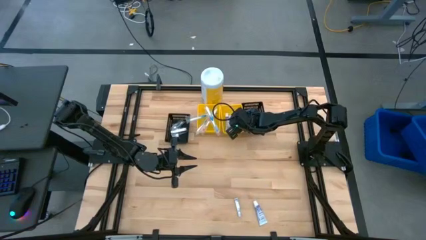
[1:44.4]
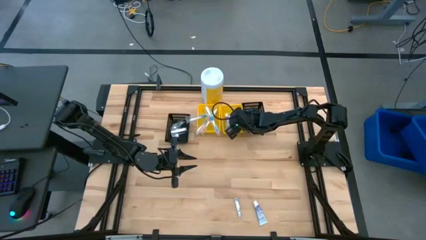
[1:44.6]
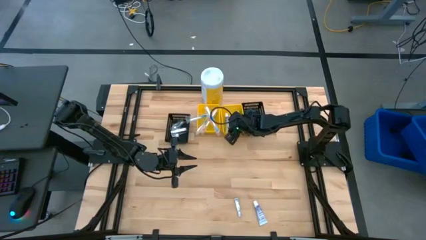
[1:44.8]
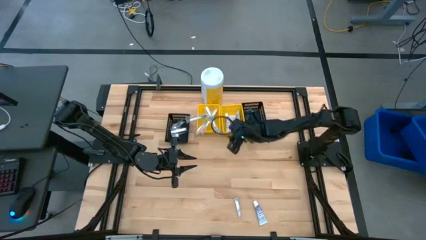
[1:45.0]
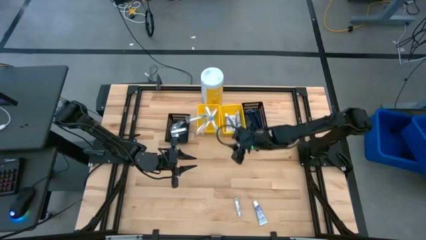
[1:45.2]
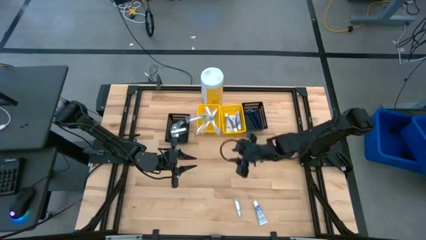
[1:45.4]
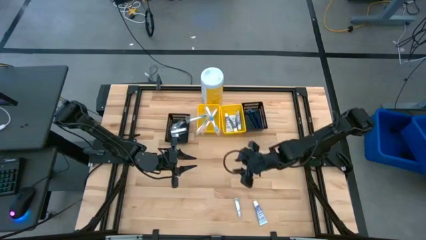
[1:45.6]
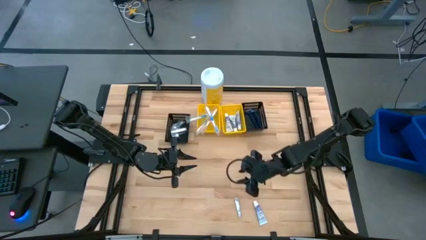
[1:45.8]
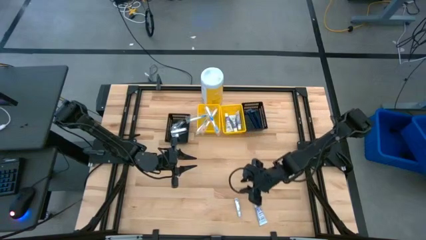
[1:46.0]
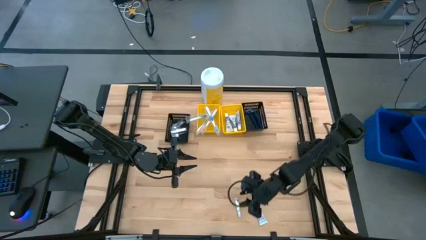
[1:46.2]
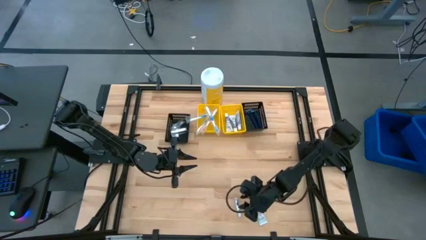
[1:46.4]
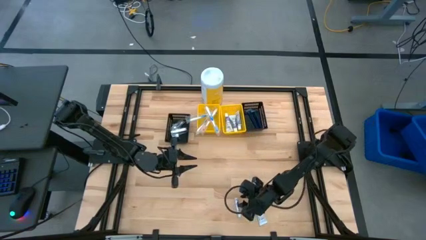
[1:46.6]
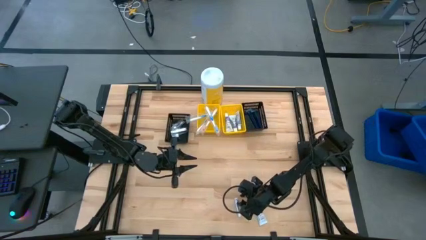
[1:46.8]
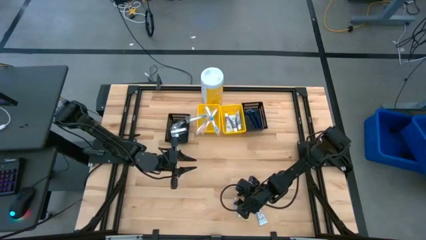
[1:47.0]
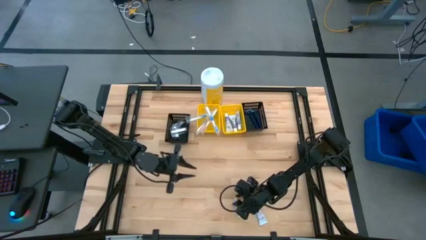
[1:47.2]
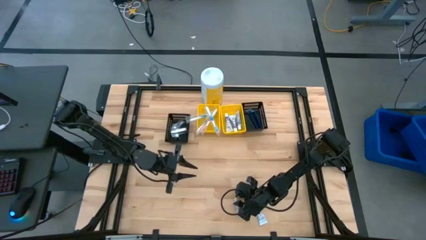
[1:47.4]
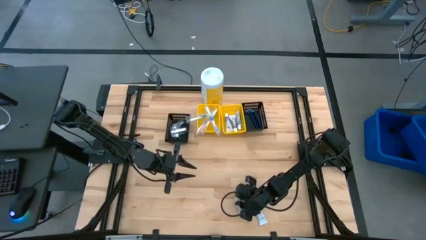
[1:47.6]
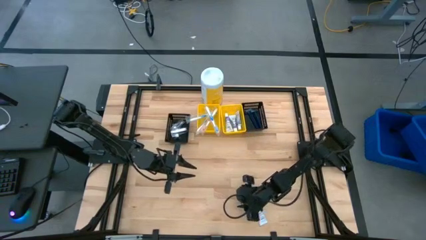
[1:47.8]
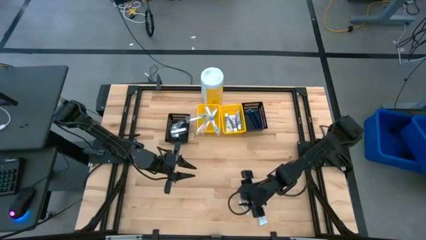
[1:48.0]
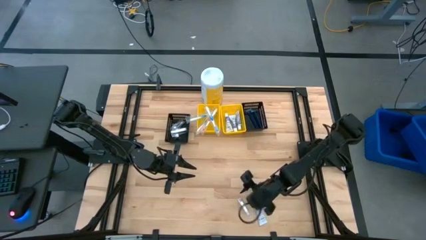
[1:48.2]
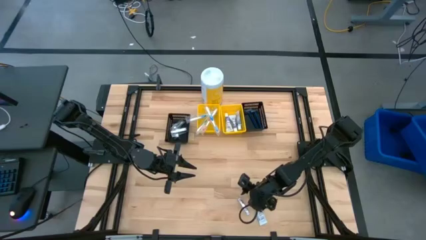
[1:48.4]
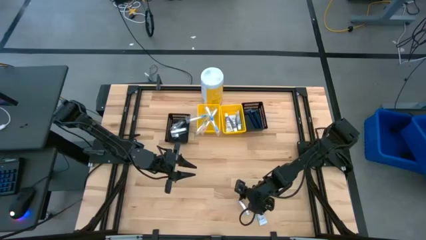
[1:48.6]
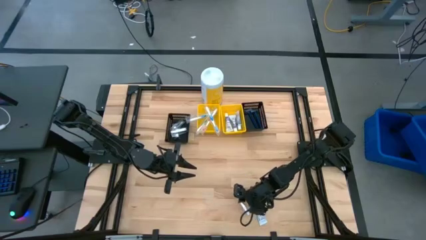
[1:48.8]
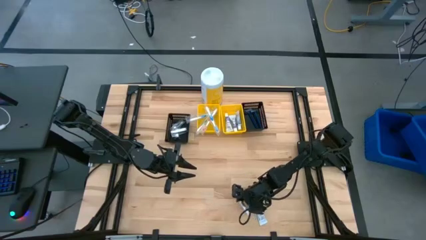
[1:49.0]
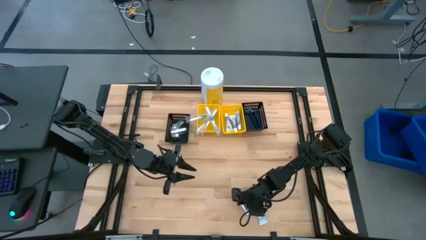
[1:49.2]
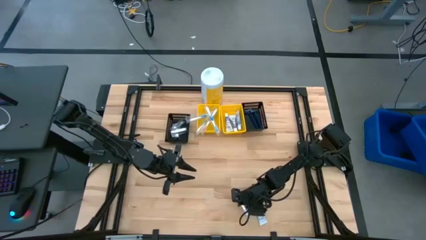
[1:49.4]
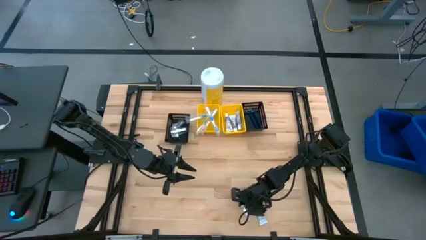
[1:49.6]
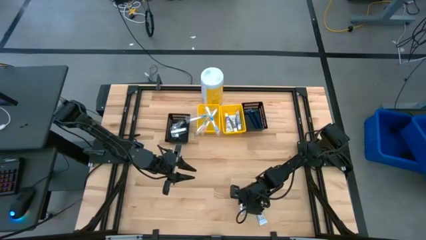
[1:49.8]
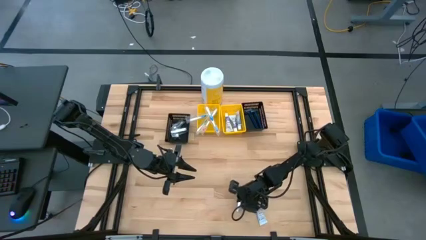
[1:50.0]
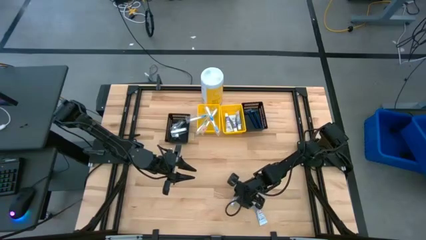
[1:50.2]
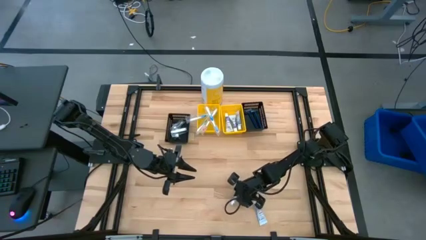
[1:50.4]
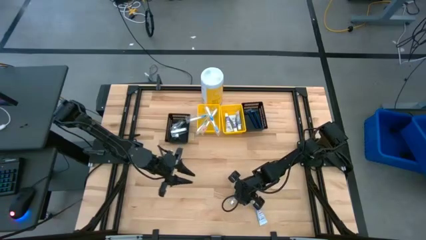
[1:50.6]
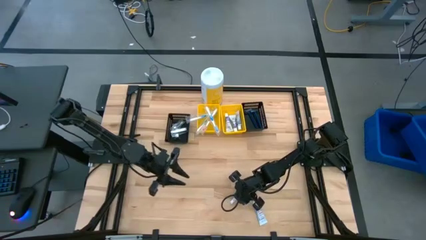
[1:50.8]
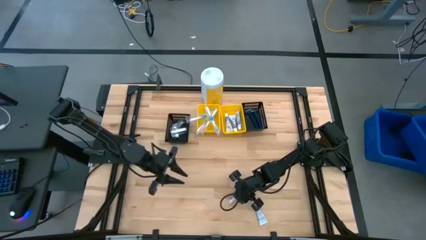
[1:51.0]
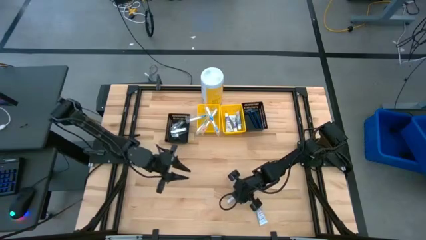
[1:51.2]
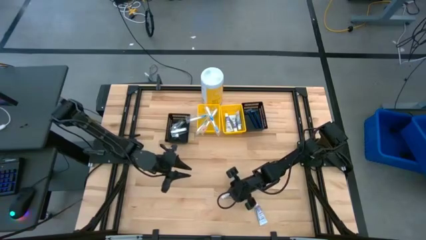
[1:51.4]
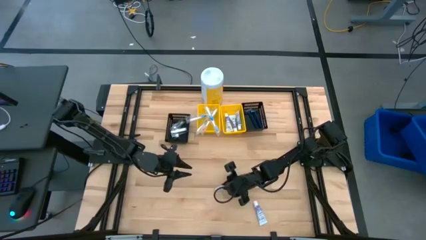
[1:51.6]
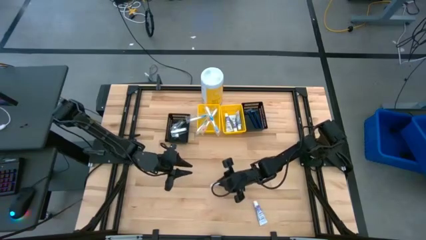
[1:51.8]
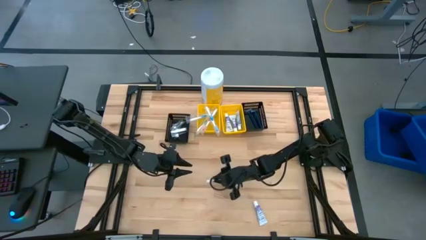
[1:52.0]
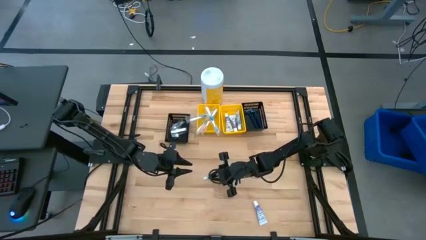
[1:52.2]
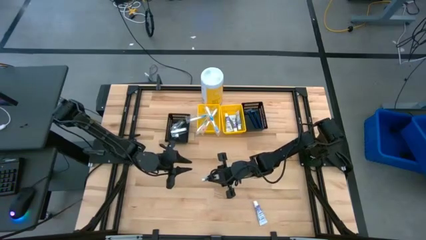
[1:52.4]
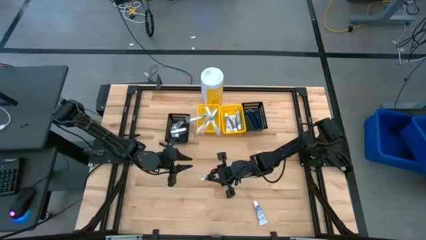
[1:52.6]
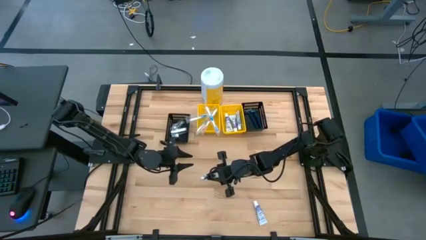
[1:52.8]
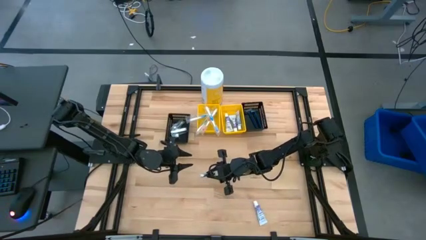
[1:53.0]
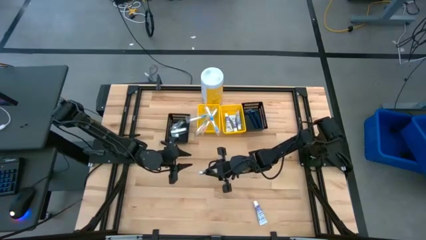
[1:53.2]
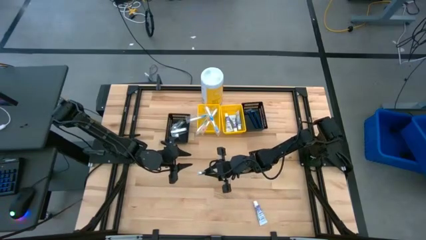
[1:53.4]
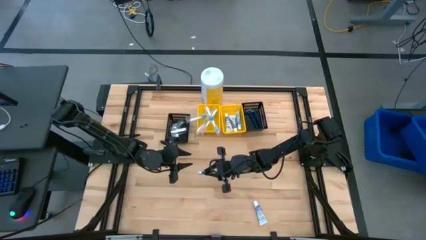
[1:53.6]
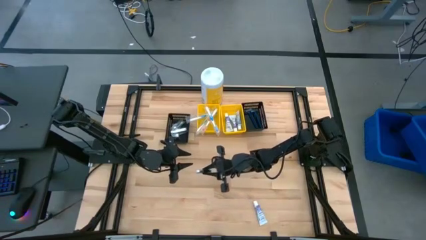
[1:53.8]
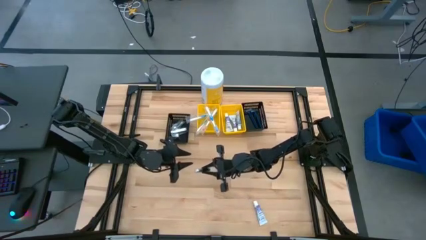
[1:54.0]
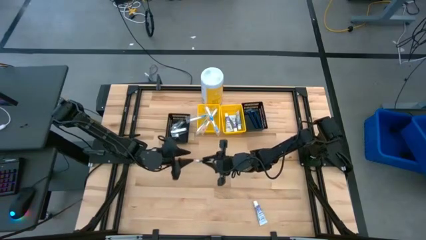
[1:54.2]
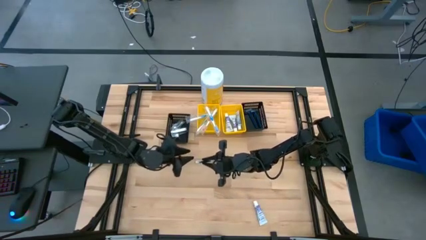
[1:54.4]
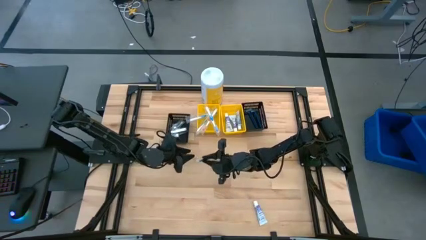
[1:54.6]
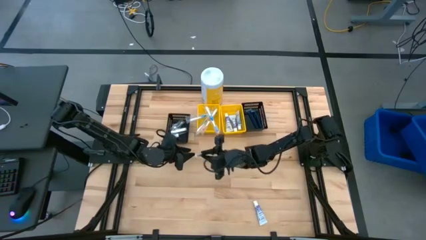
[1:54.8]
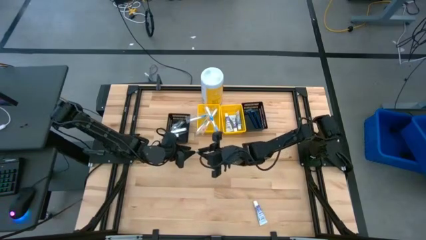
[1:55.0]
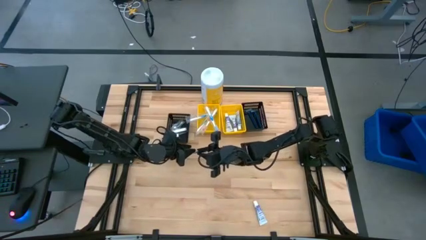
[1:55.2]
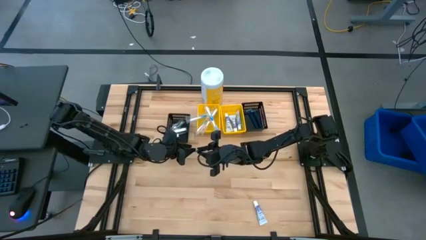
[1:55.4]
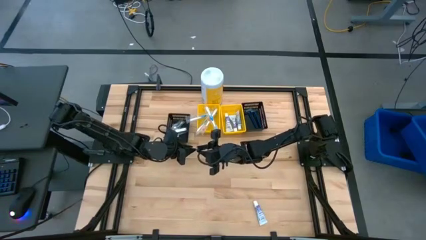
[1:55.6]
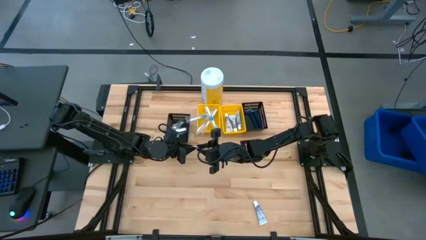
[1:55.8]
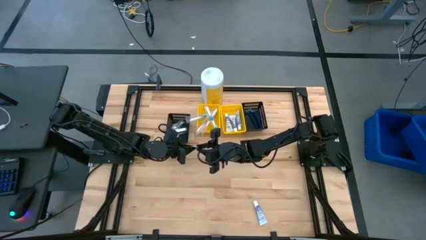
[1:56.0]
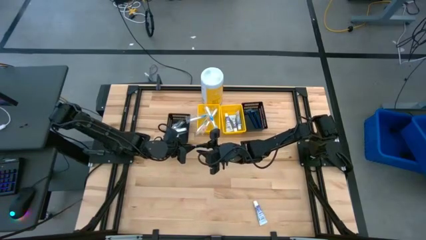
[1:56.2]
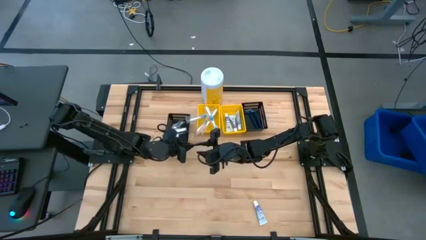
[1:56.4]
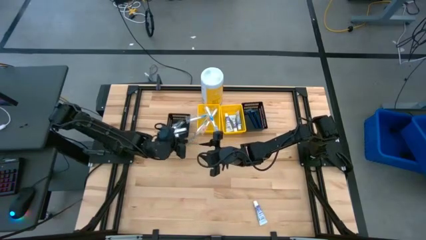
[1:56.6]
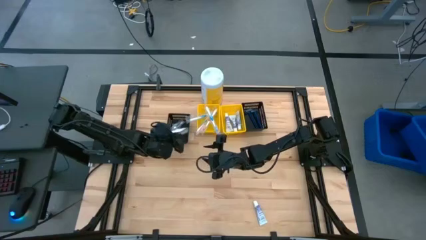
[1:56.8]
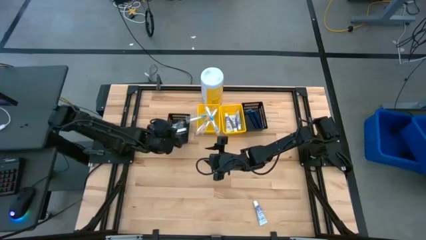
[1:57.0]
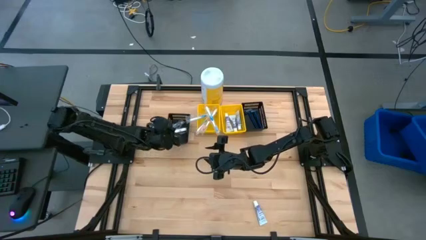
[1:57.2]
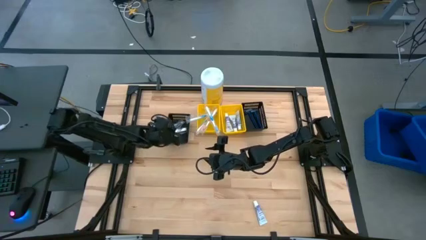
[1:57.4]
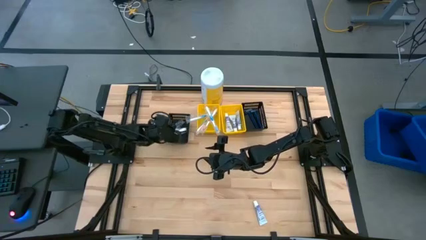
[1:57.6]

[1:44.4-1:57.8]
Task: Pick & Place Travel size toiletries
Put the silver nail cutter into the left black bin

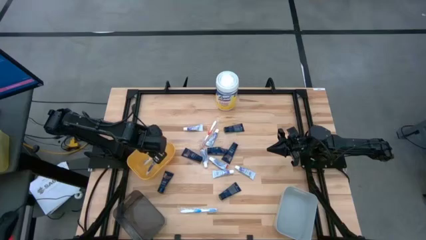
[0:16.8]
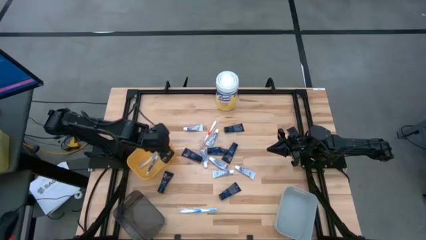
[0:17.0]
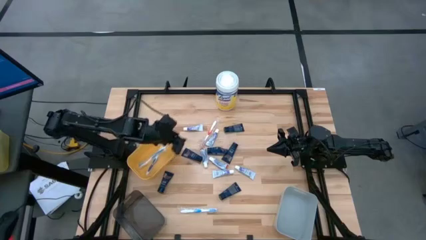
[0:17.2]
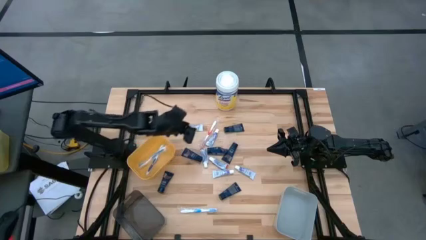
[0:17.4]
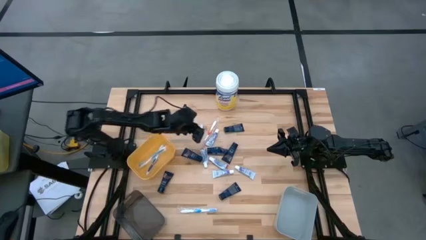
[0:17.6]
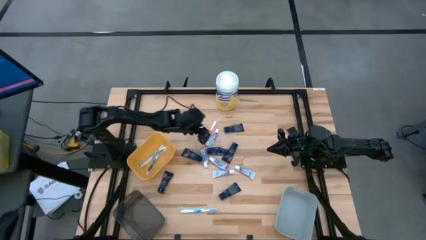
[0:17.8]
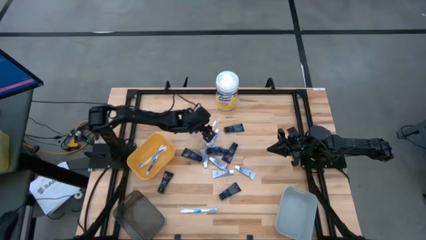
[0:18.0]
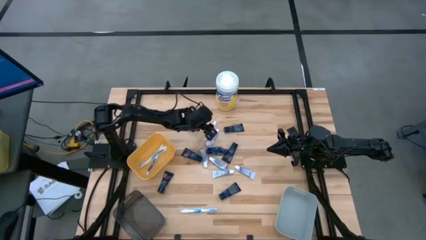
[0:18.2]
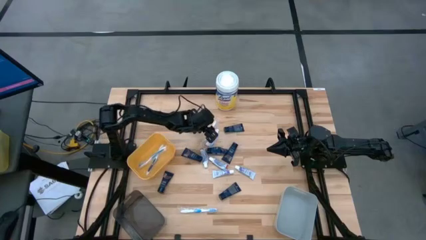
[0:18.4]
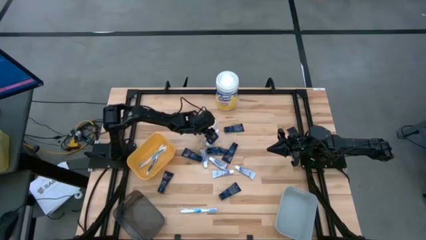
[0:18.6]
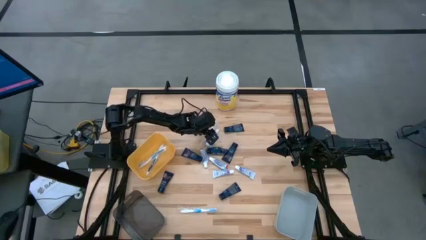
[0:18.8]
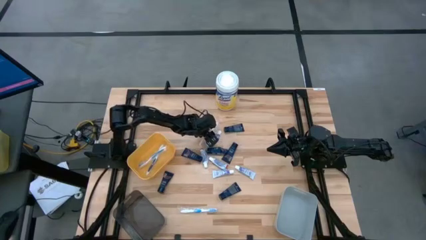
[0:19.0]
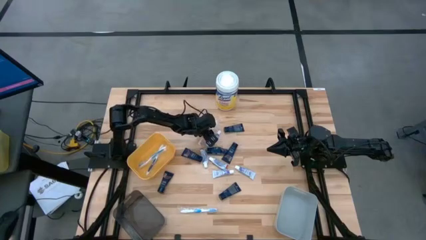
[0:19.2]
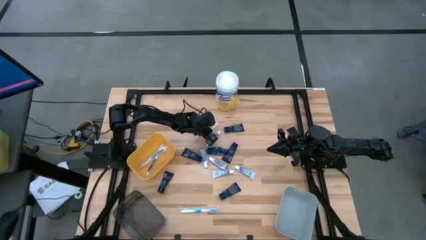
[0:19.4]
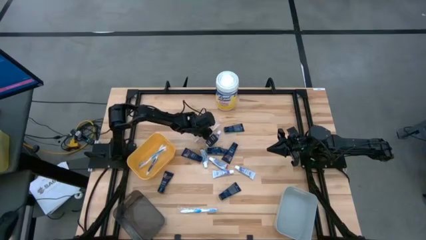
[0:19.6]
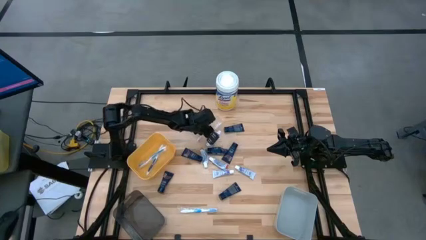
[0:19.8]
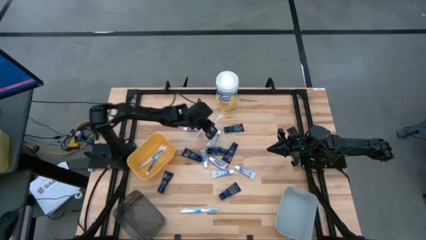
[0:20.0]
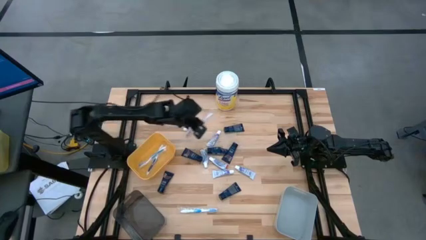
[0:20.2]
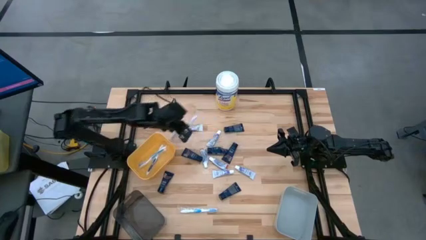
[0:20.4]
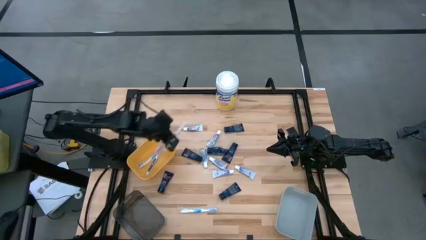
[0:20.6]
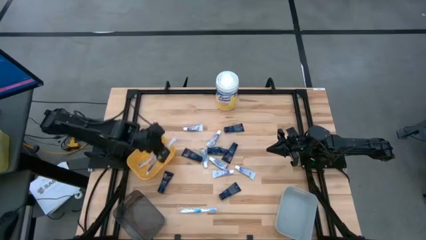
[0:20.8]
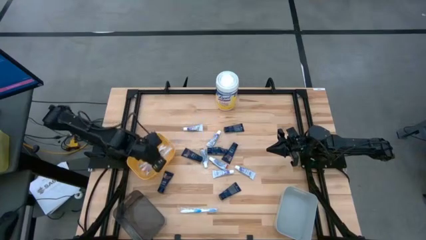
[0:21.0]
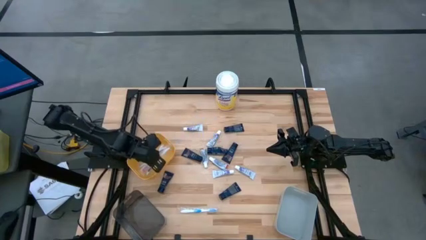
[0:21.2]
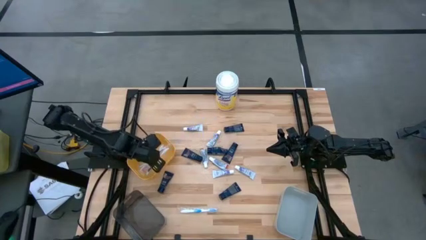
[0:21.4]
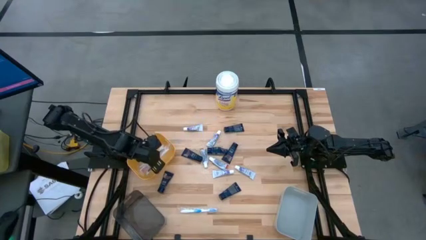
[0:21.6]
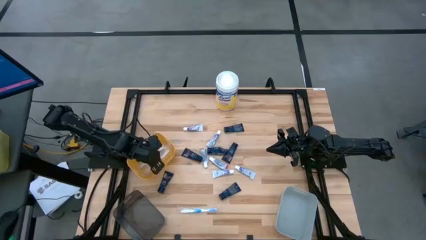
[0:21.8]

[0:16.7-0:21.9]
Task: Pick & Place Travel size toiletries
Put the orange toothbrush into the yellow bin
